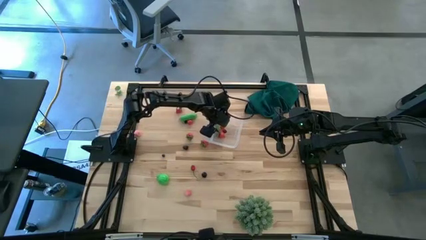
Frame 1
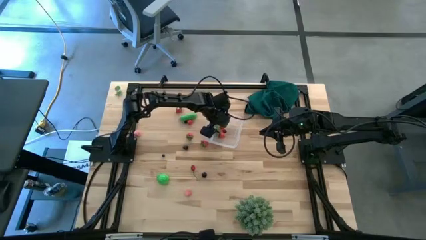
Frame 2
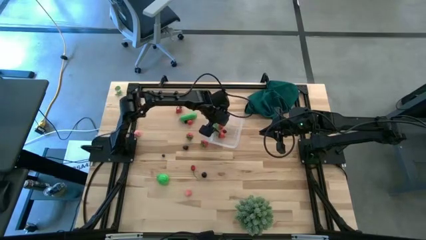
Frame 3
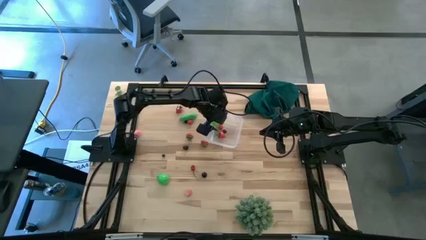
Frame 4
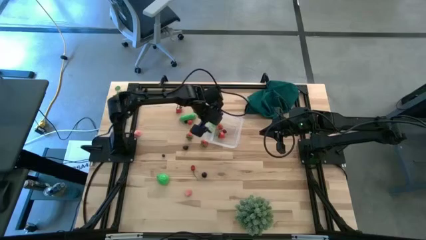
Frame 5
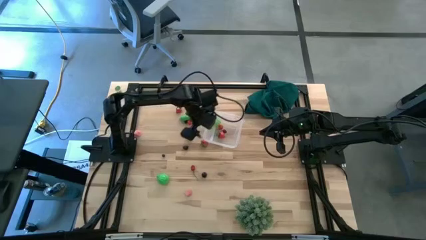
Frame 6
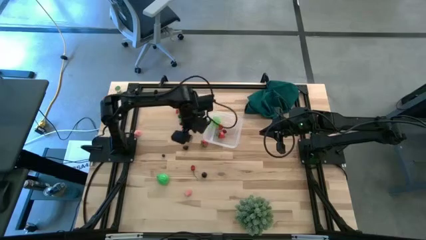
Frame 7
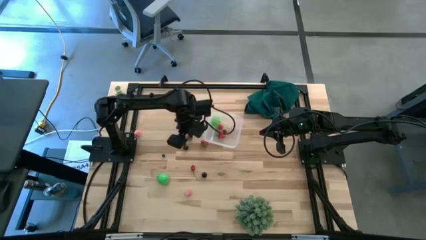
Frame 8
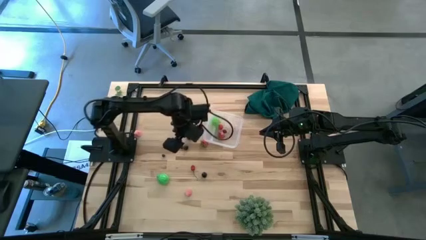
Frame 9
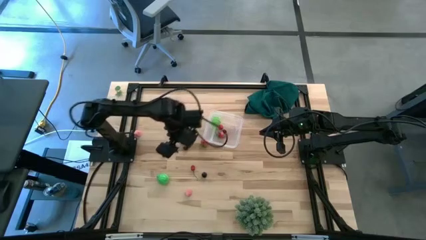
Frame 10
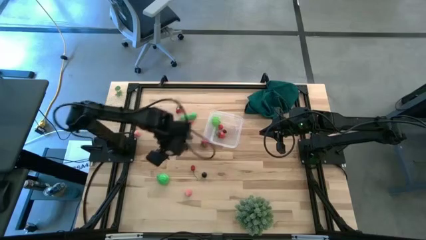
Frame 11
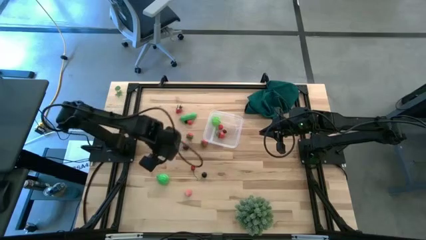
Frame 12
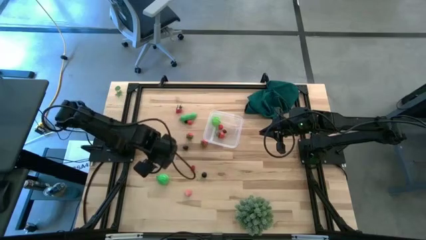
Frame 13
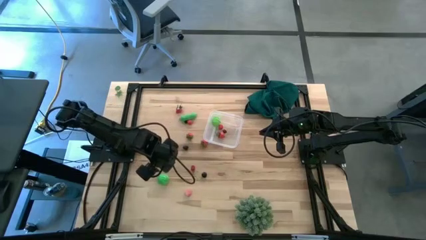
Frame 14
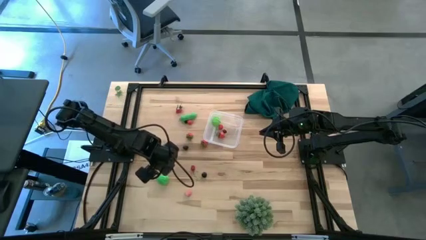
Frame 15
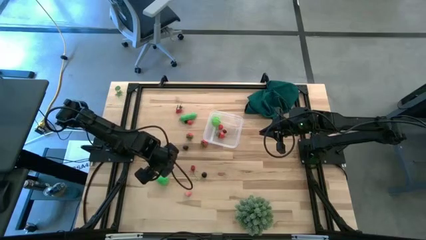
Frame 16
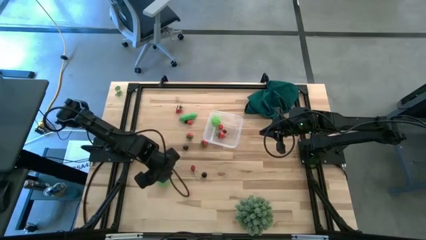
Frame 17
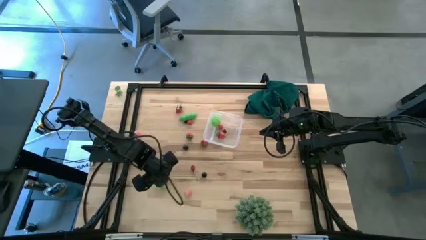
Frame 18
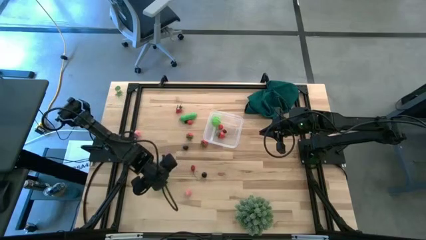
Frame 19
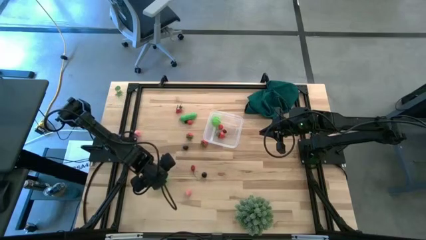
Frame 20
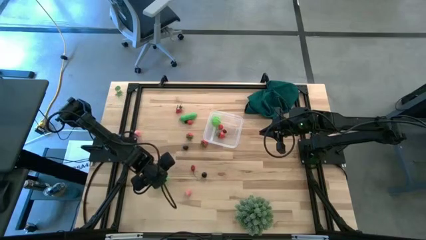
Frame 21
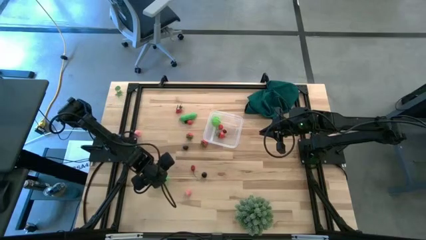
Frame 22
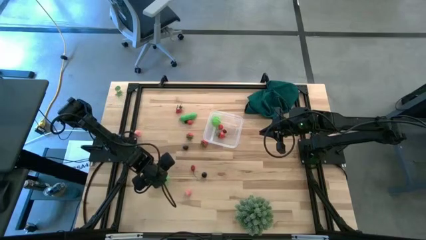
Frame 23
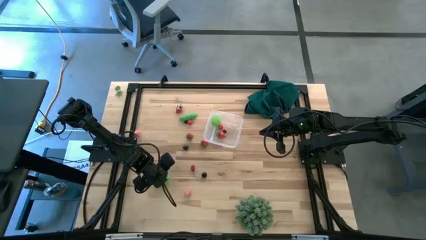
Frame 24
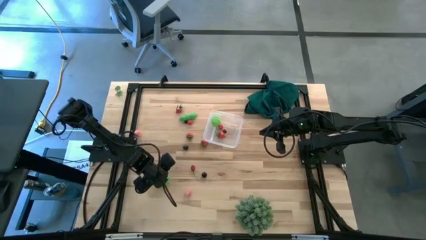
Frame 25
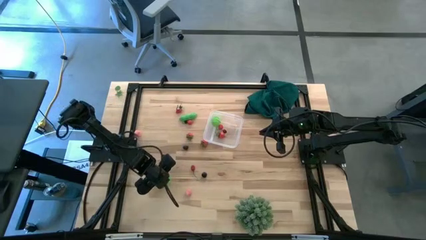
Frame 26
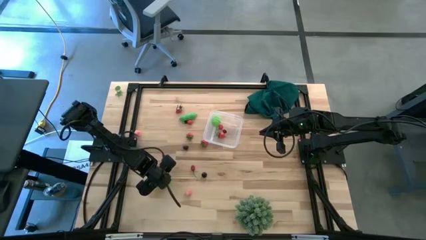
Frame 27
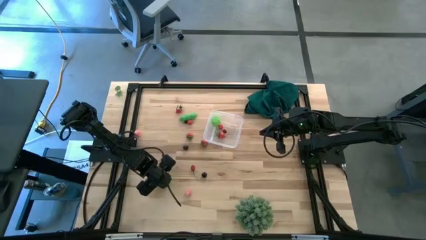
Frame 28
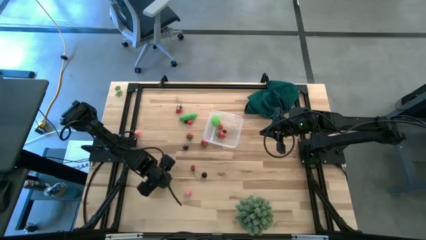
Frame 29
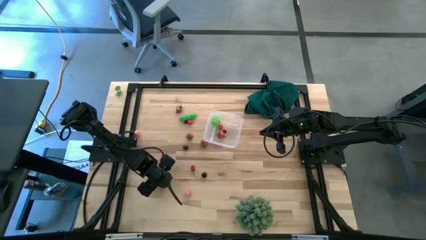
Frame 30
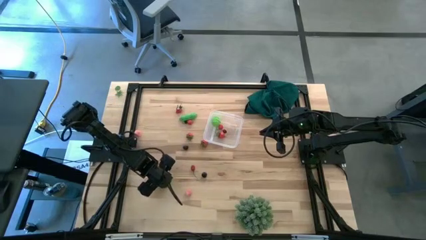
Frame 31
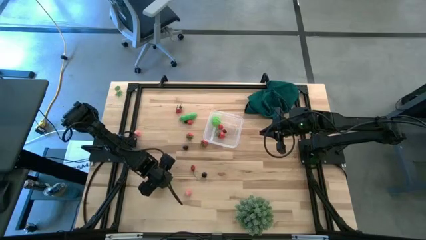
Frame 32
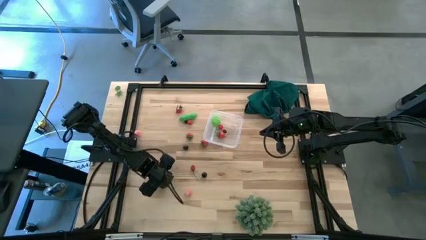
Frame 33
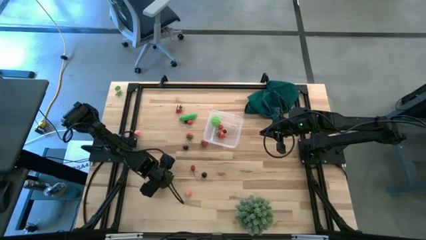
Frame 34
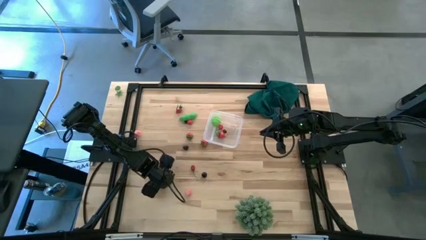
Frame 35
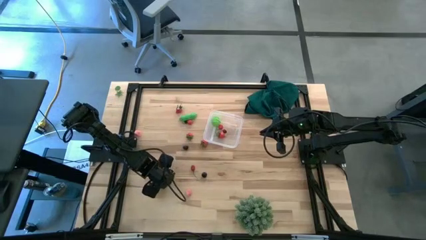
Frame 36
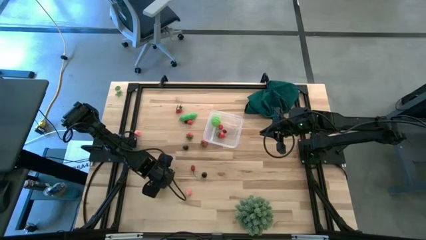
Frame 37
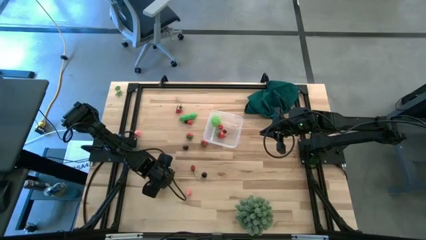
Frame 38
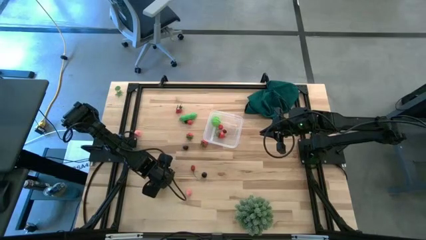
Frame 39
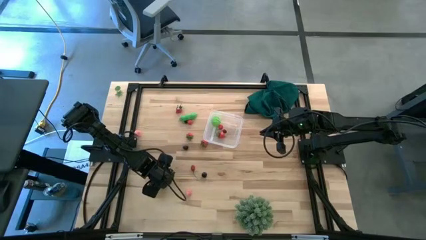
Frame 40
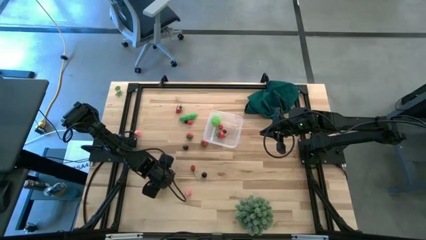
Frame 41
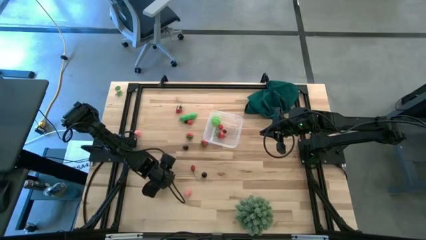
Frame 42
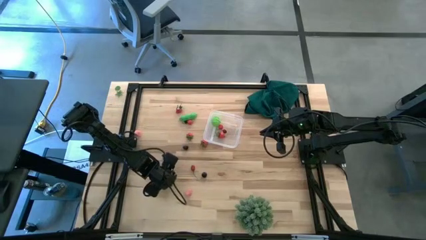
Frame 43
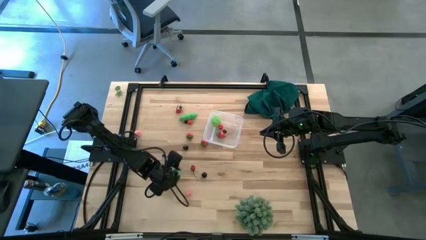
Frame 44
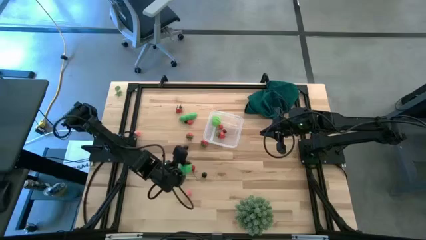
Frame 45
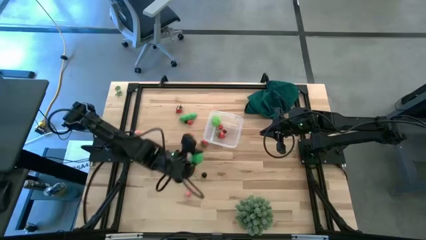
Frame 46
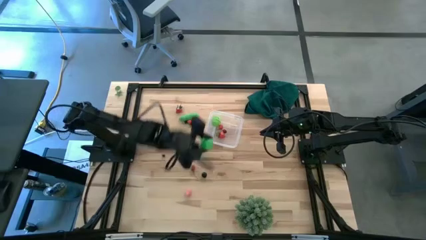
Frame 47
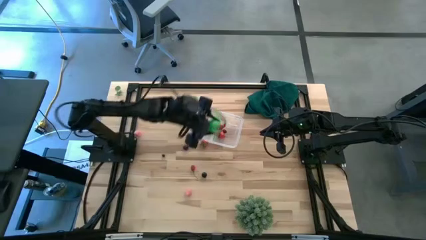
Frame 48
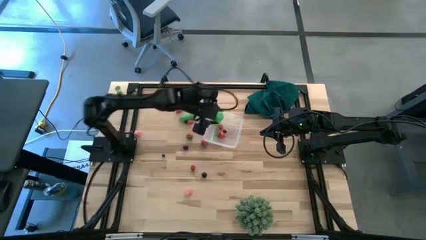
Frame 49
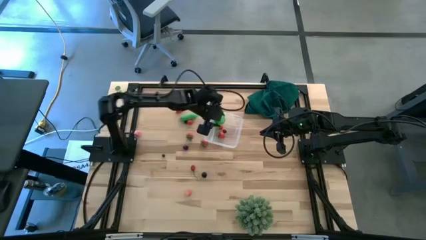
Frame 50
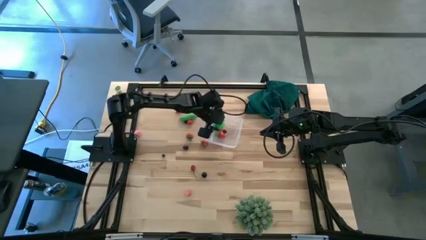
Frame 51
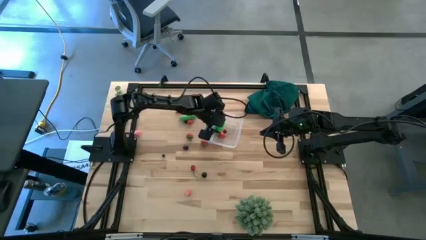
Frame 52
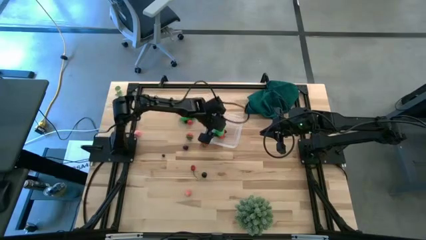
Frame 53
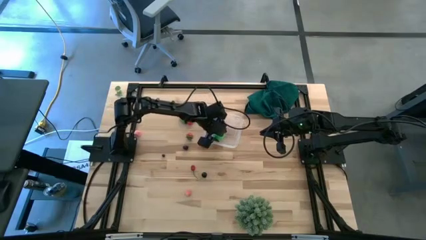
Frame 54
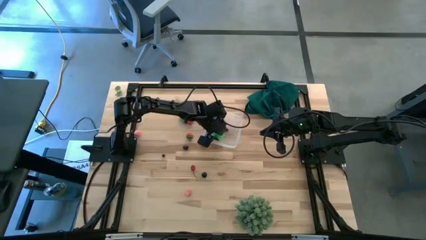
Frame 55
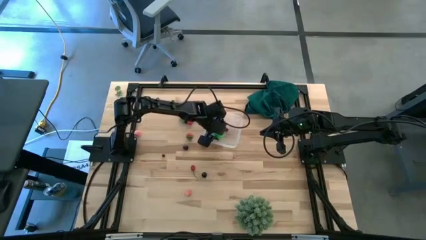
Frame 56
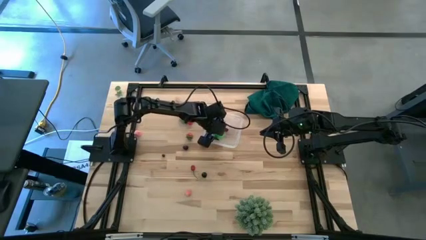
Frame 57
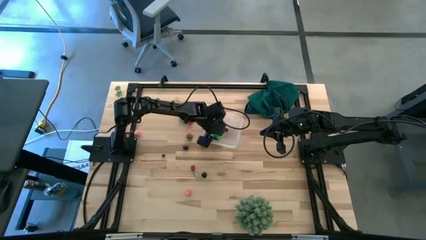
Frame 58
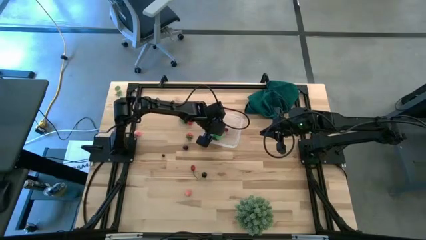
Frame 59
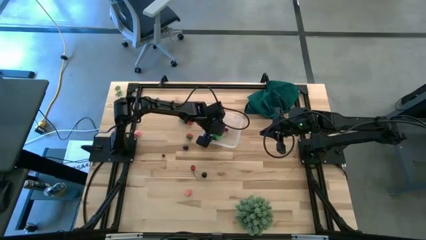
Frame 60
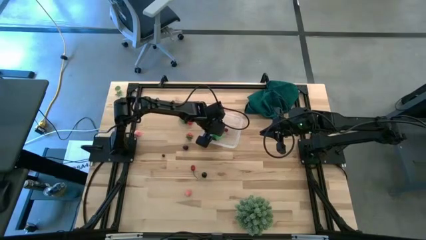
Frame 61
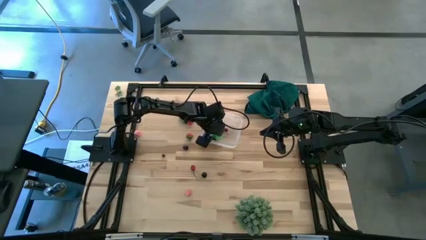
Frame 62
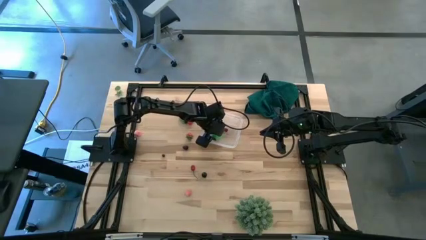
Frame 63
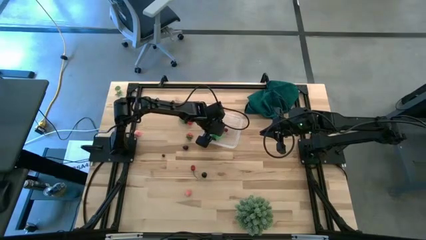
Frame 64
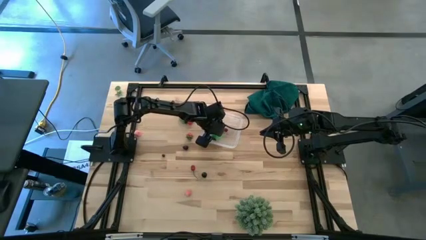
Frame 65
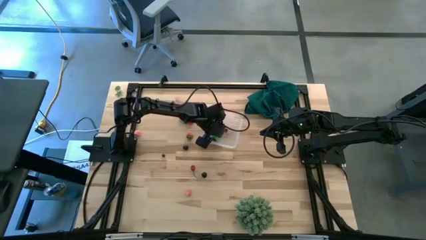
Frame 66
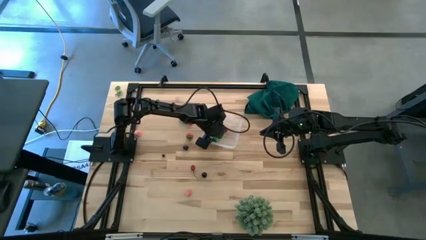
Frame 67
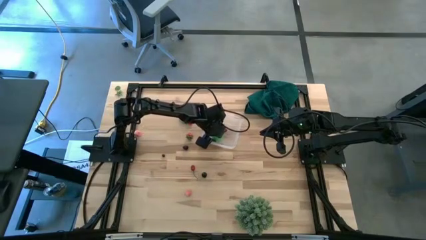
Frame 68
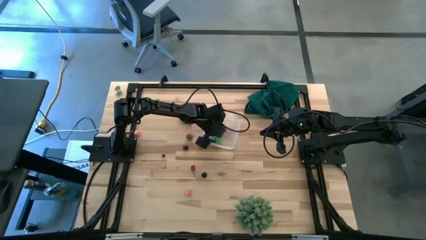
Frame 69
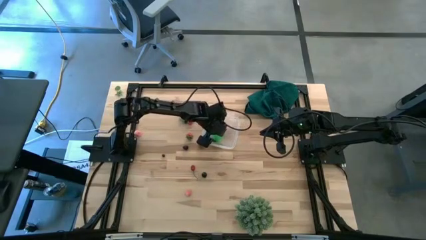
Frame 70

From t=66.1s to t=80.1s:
Task: Pick and placing Produce into tupperware
Put the green pear into the transparent bin

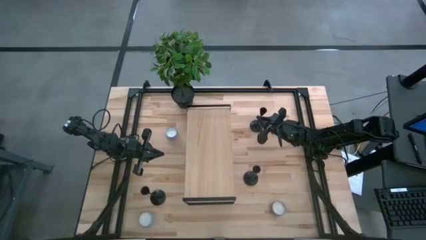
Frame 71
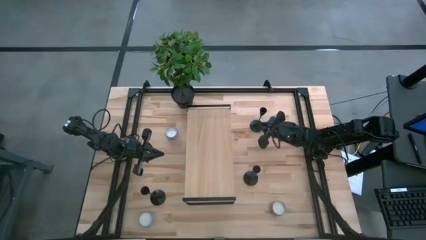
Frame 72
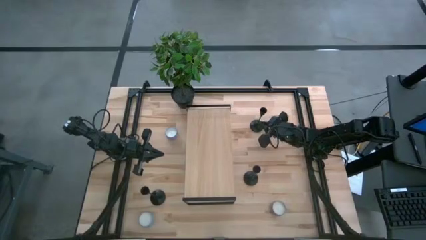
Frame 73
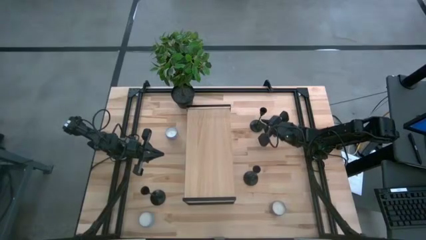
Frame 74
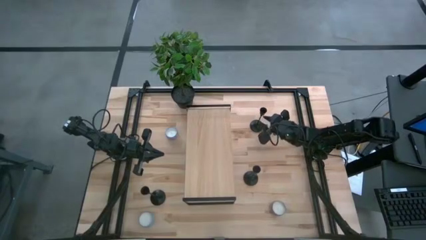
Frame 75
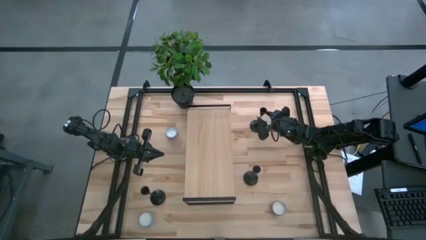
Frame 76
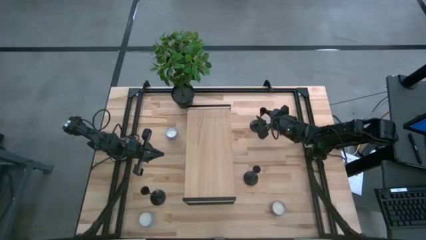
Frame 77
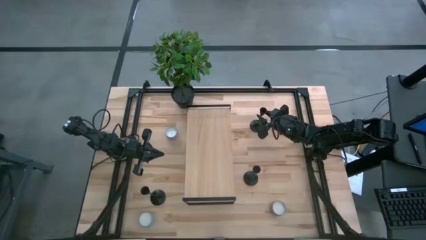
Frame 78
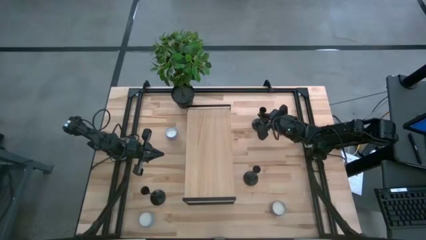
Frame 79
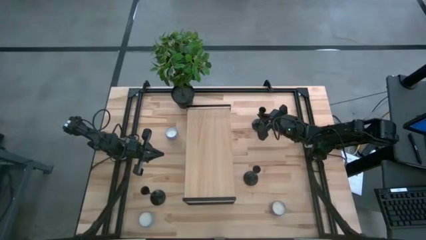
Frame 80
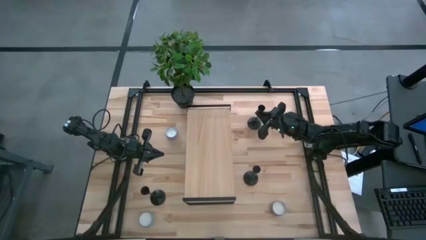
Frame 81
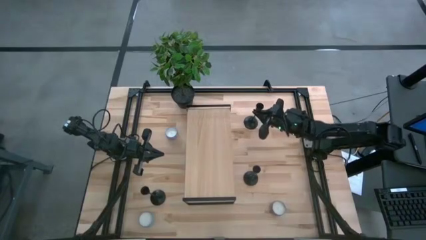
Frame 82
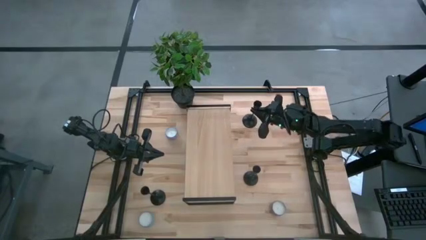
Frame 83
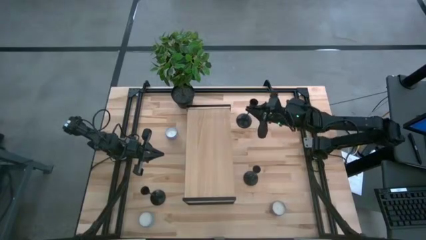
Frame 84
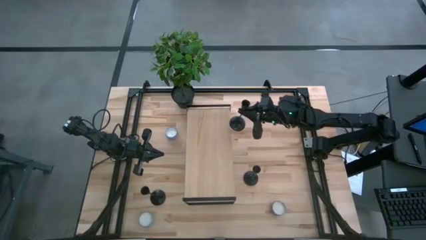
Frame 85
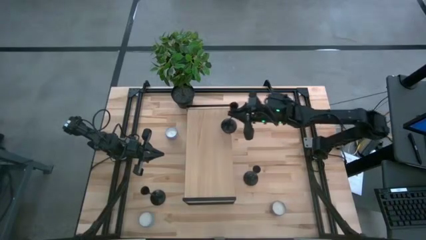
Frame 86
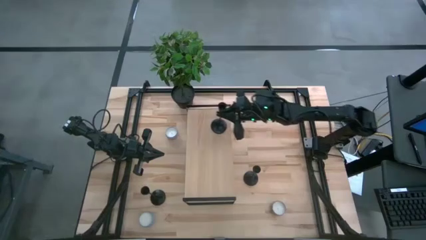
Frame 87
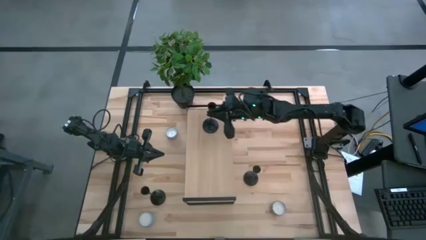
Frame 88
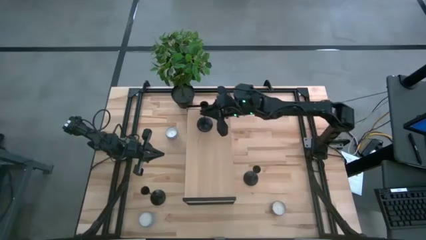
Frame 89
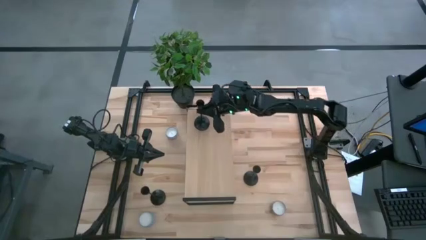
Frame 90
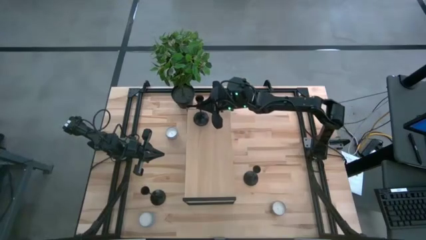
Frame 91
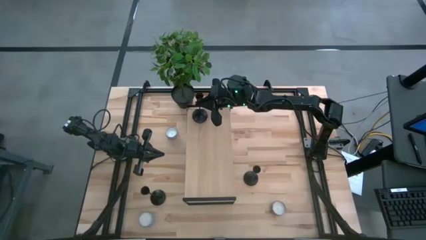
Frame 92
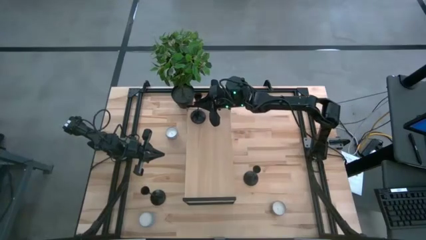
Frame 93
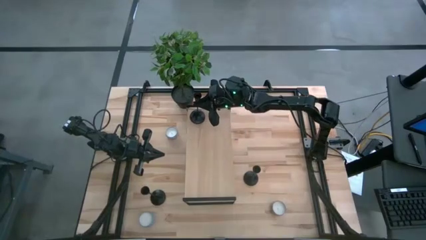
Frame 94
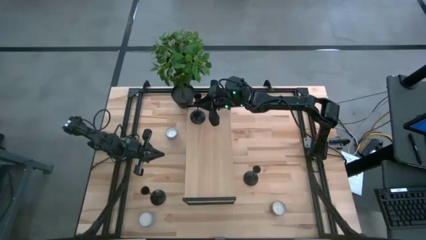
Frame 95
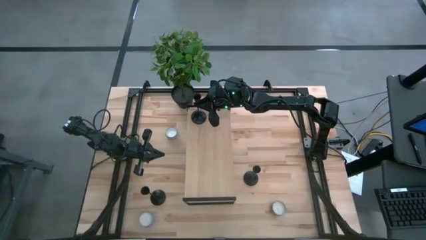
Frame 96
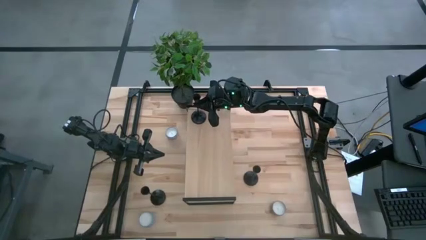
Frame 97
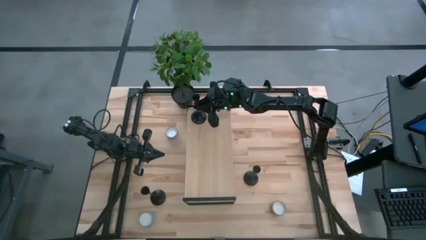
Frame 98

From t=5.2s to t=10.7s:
Task: Pick & Place candle stick holders
Put the top right black candle holder on the shelf
